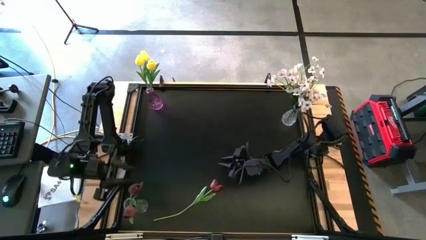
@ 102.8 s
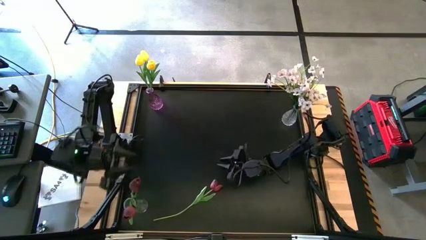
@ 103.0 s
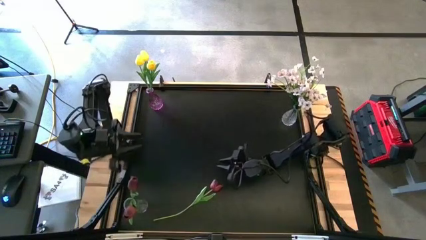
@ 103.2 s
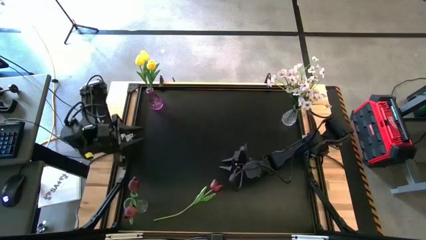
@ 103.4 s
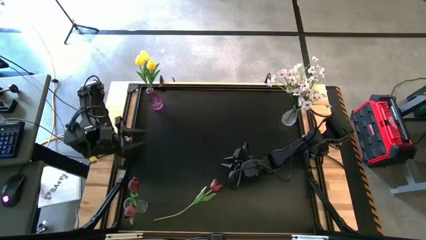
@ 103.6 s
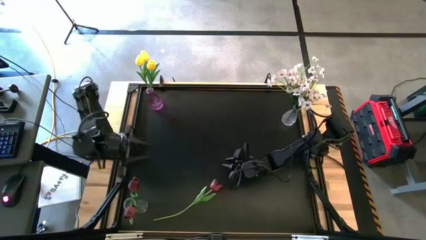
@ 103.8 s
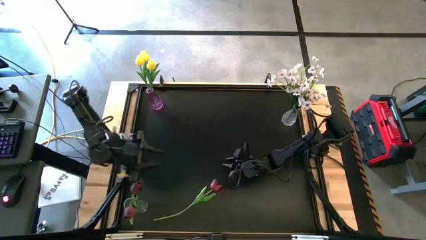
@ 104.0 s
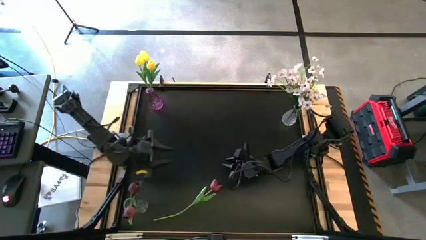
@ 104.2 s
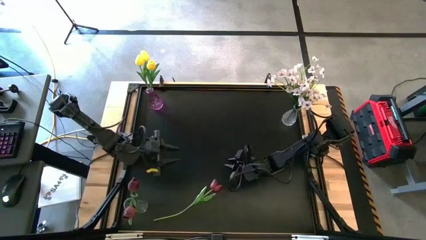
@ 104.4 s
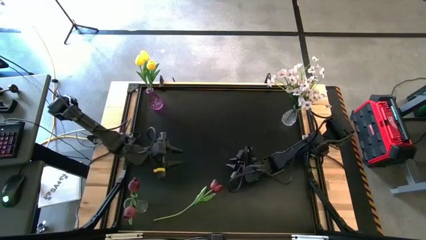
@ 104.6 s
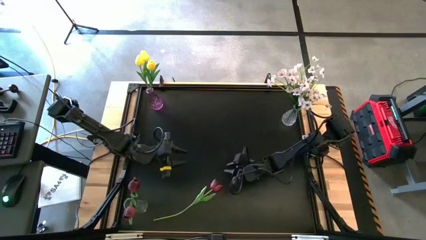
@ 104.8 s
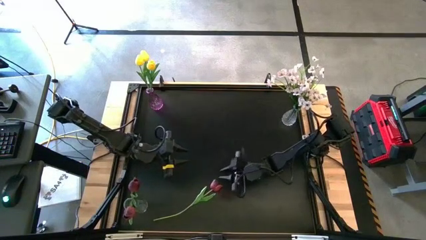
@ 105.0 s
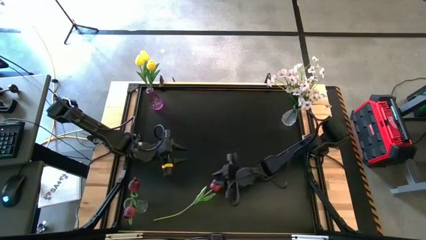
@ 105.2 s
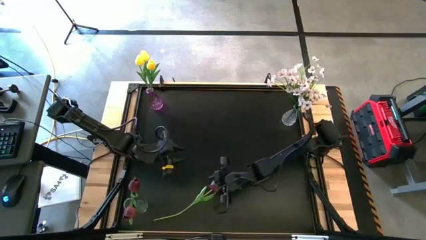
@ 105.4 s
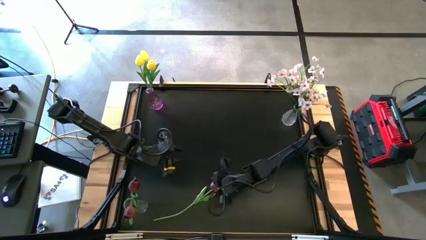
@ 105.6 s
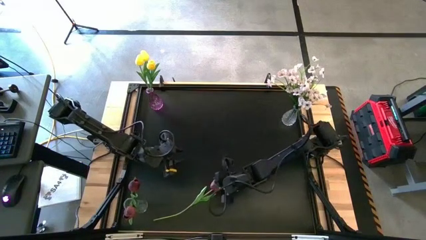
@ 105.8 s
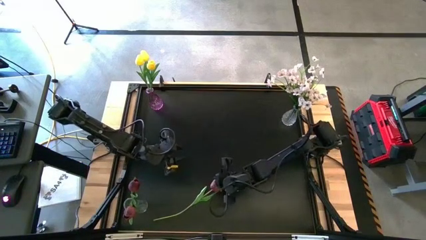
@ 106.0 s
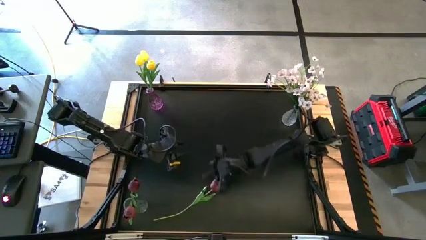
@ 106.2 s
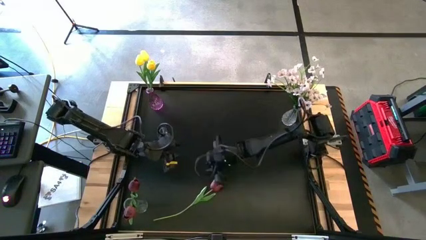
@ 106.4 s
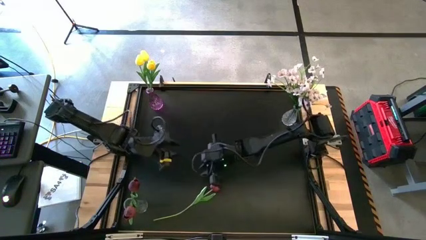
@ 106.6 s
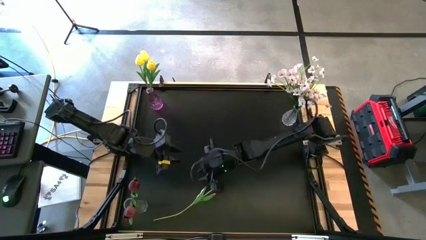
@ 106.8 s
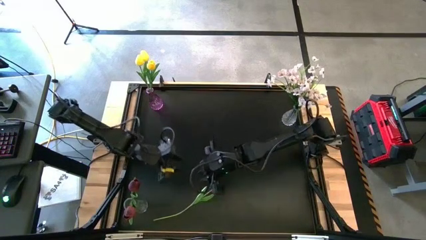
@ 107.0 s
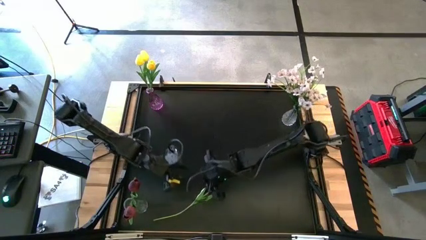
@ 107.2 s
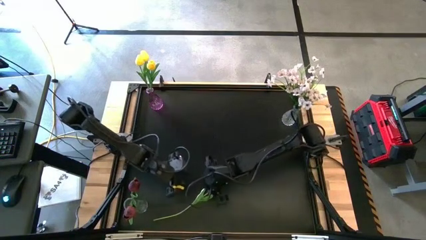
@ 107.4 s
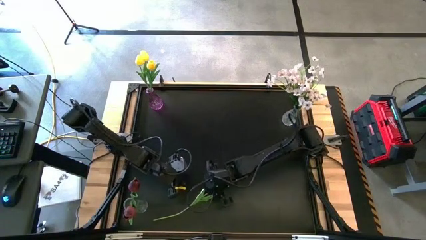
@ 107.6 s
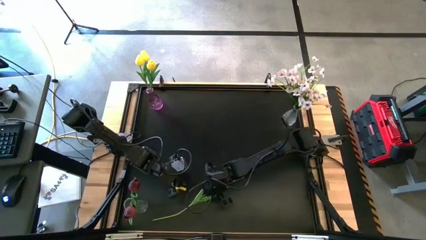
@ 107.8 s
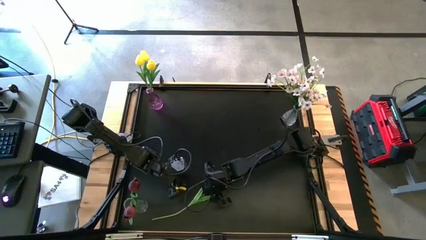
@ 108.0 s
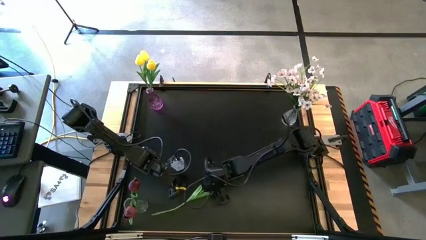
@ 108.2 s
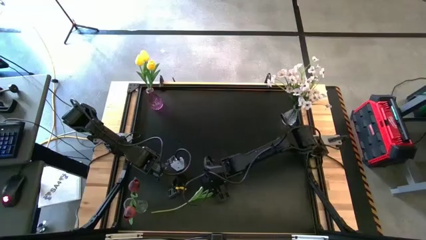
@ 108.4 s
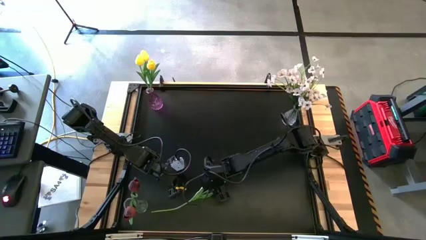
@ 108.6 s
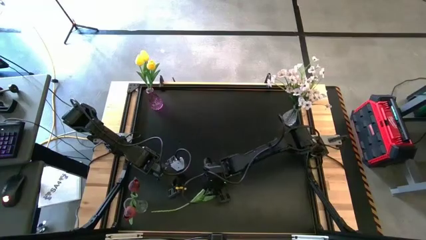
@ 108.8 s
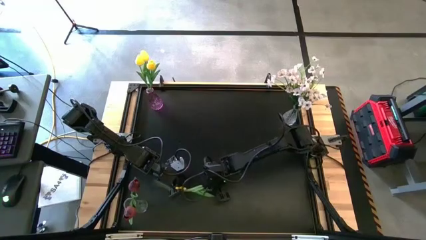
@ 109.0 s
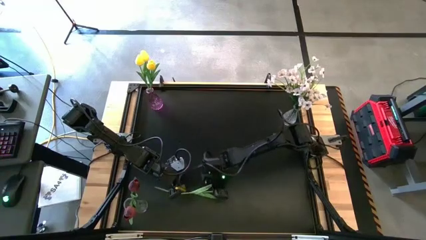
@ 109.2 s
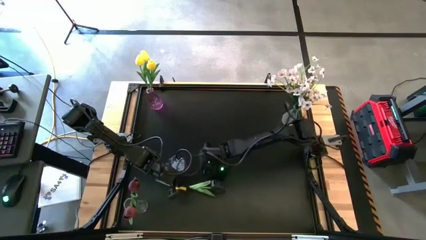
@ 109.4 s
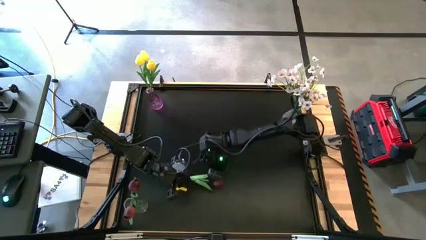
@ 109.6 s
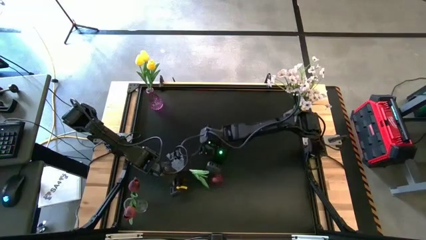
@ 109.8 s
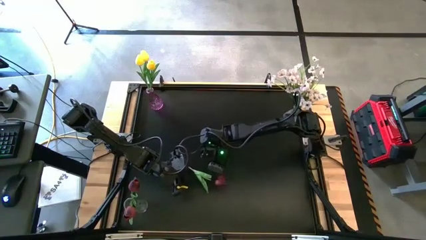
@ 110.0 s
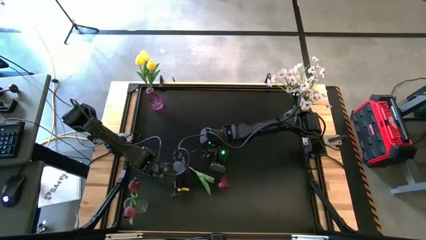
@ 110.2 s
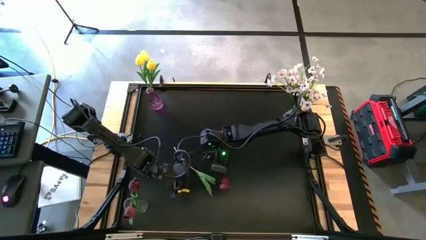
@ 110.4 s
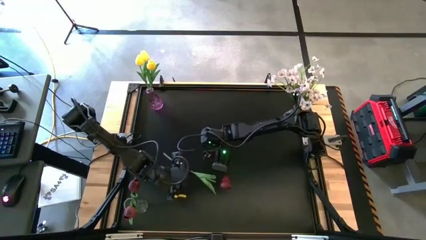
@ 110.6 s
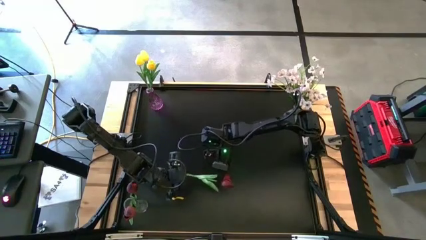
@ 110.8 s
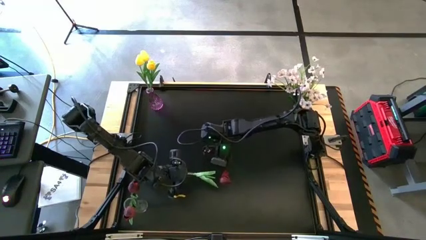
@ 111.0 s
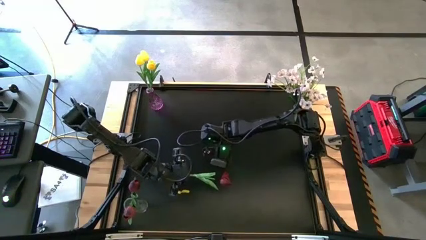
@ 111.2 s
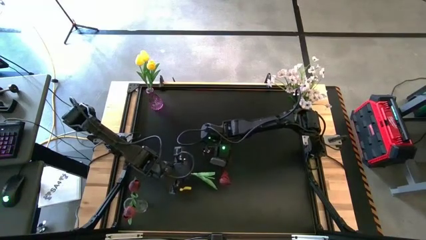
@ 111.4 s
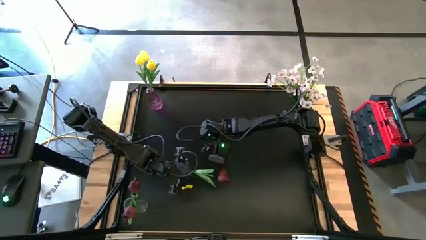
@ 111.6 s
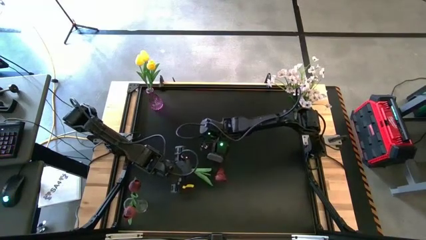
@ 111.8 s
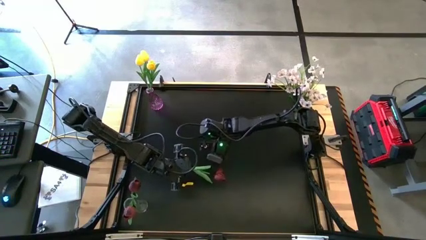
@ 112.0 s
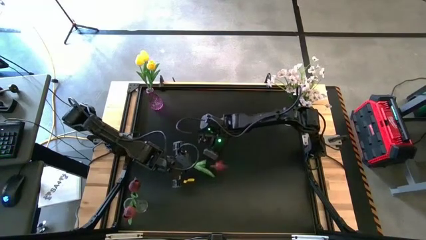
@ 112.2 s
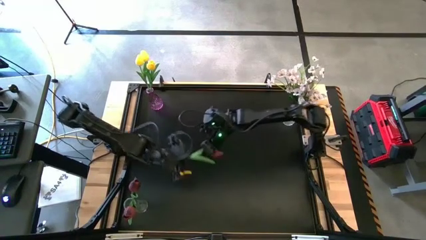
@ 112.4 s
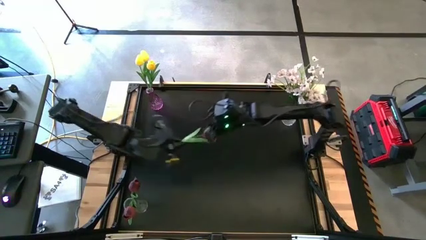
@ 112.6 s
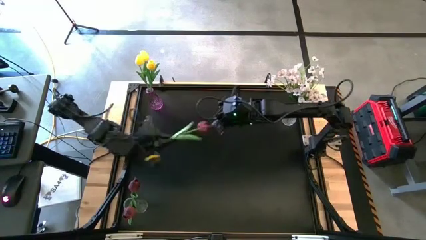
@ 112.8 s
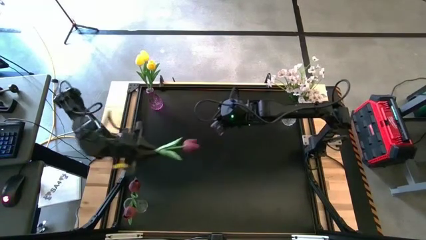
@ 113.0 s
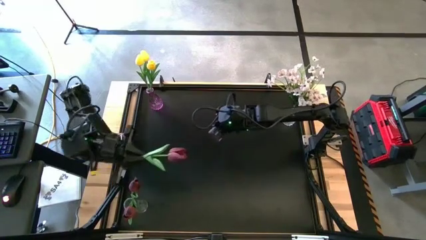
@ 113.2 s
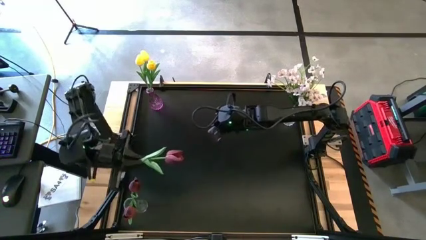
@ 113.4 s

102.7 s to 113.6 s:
Task: Sort flowers into vase by color
Put the red flower into the bottom transparent vase

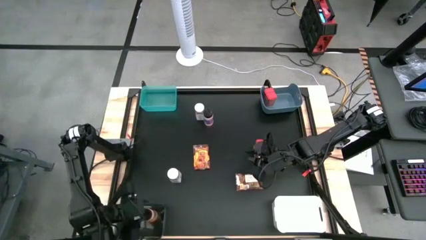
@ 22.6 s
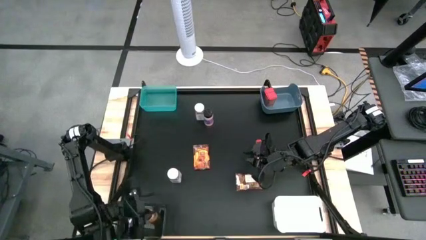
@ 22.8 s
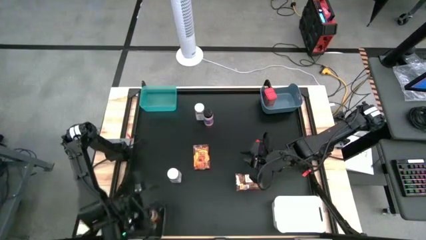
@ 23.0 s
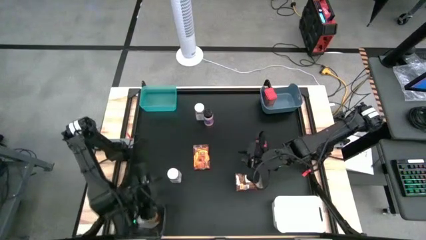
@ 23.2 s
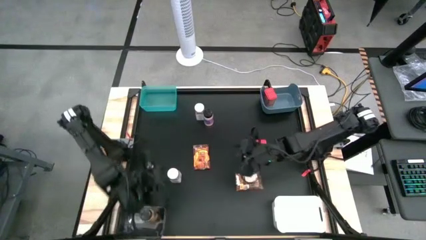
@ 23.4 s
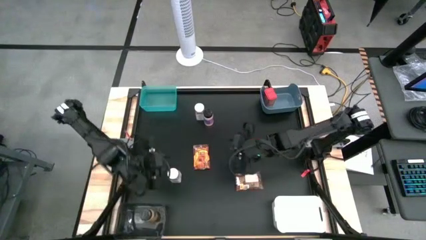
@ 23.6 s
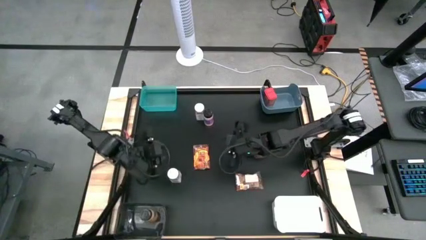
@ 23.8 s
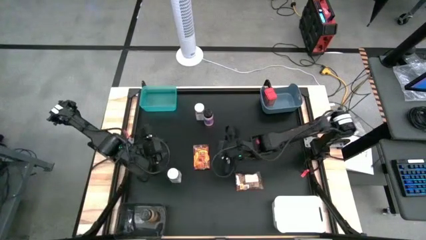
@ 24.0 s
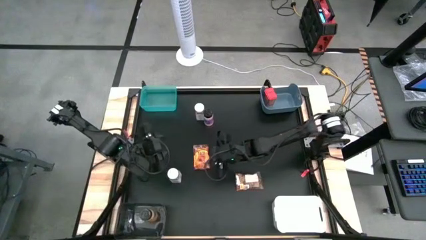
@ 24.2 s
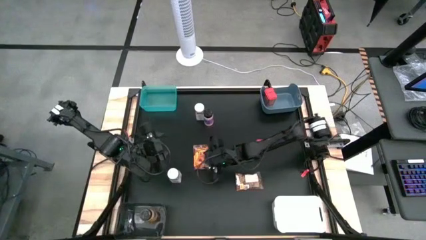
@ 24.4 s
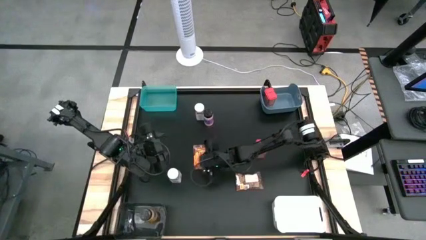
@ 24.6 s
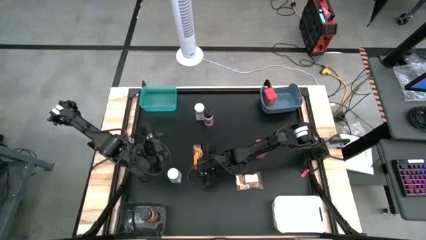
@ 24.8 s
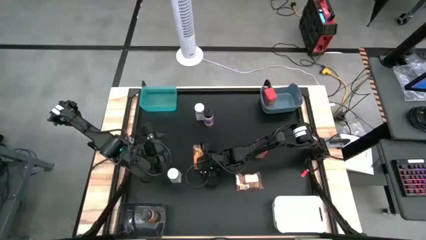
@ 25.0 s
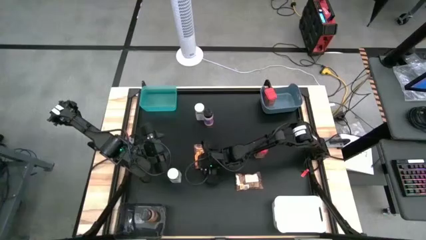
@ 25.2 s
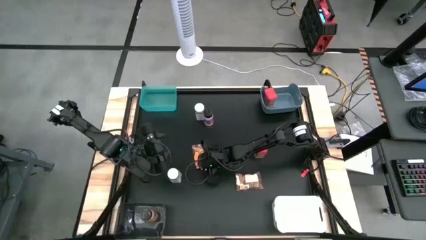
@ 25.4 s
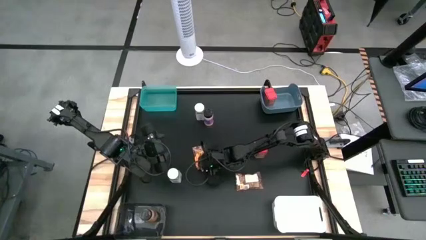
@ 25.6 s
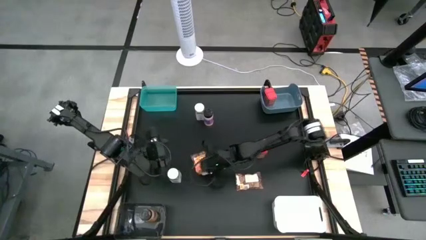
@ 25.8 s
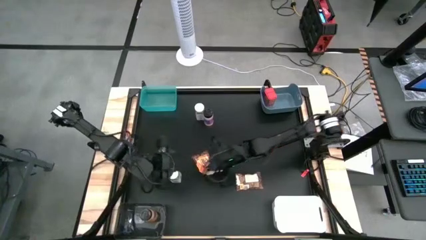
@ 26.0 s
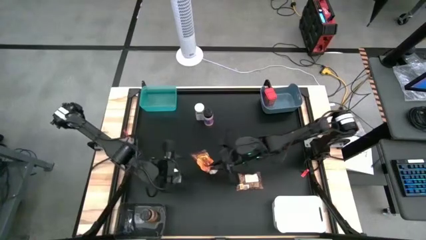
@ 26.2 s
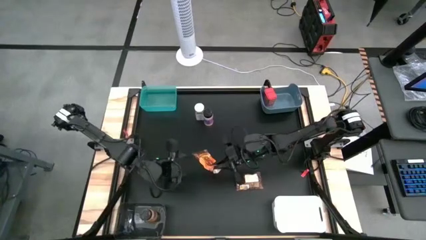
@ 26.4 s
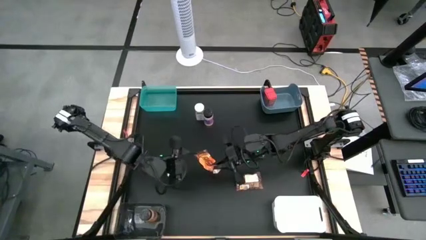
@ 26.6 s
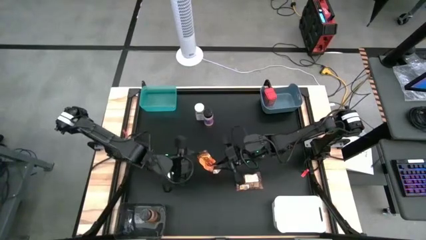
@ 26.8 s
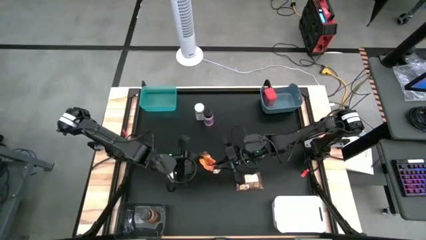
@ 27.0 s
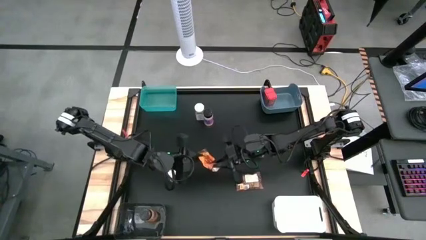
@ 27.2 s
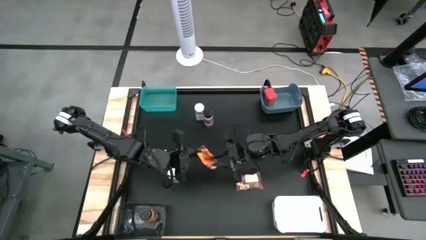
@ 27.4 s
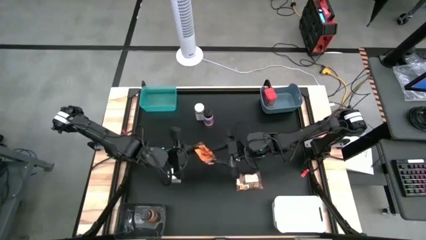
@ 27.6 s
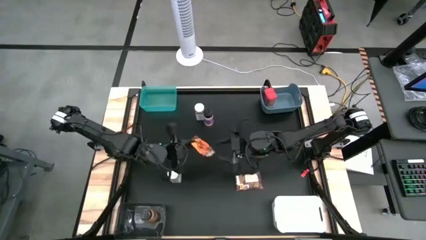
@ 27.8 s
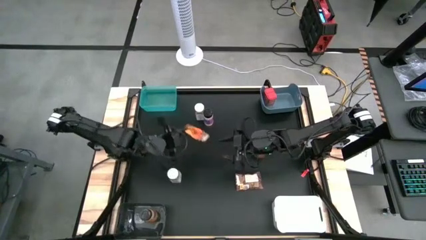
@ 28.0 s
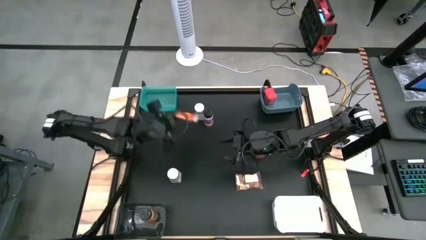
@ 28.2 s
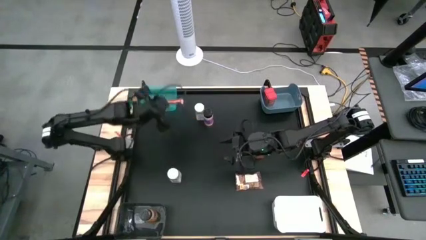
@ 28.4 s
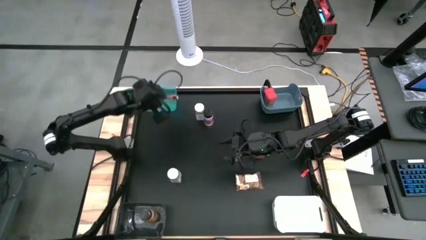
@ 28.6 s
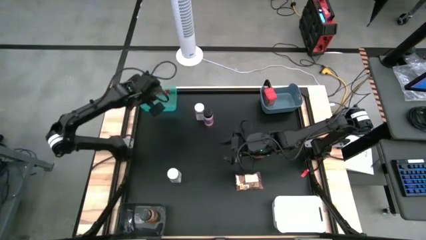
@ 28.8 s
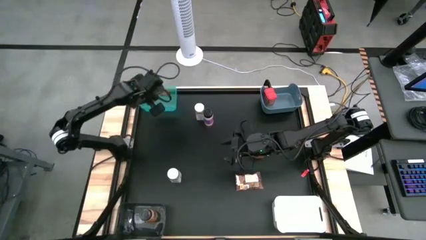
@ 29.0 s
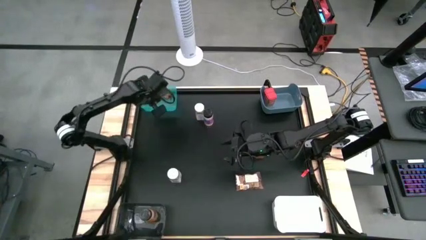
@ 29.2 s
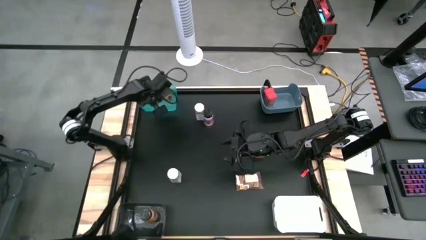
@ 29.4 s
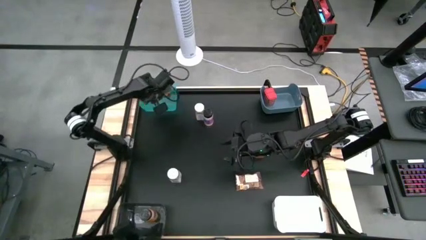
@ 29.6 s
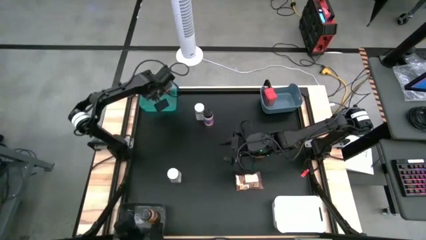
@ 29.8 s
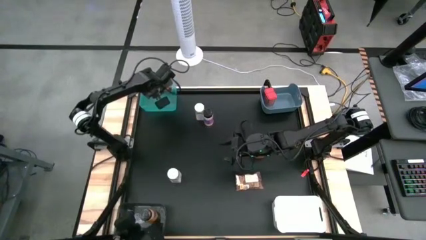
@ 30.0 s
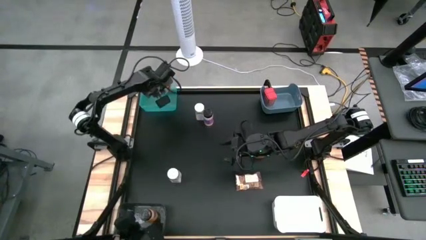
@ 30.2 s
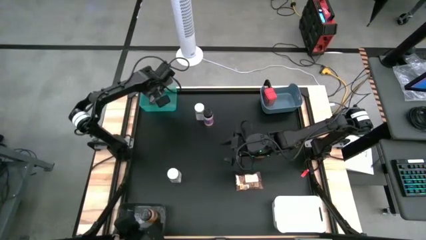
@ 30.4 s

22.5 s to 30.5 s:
Task: Sort spices by type
Put the left orange seasoning pack into the light green bin
